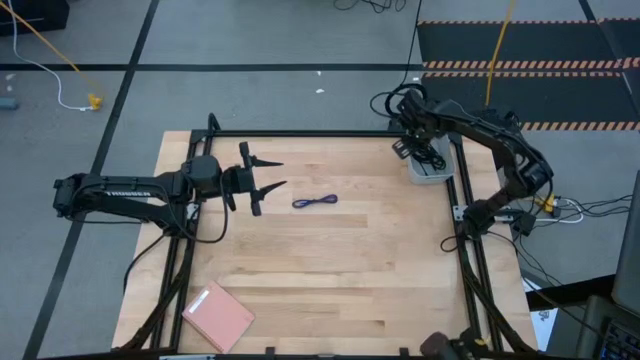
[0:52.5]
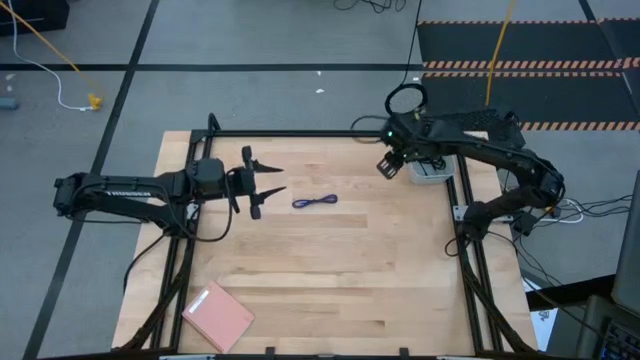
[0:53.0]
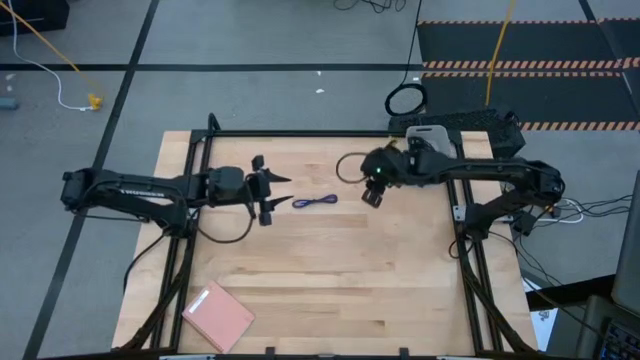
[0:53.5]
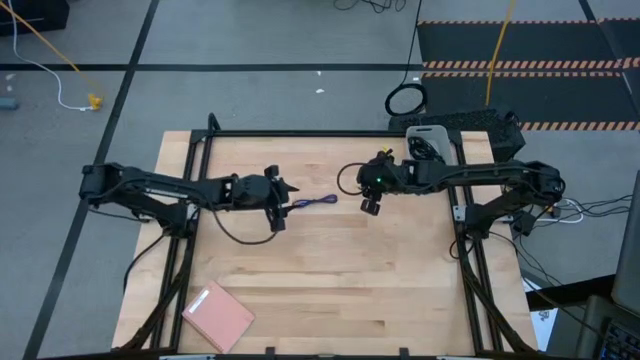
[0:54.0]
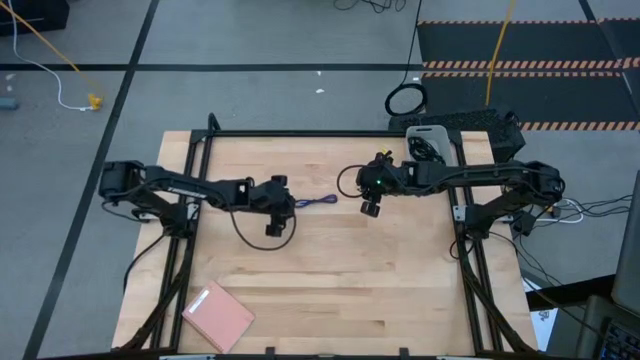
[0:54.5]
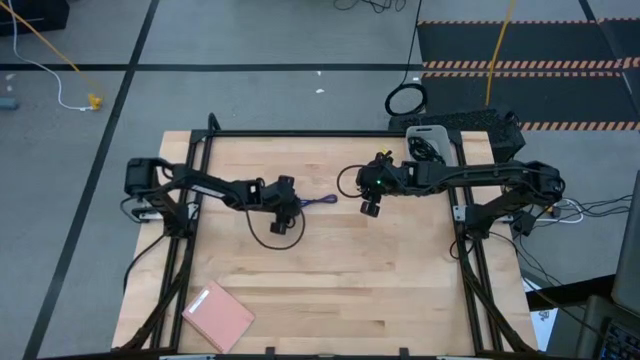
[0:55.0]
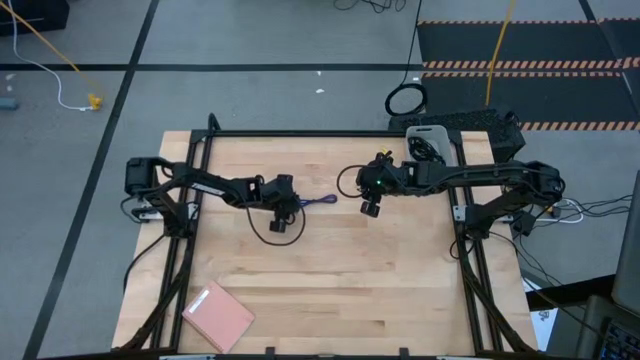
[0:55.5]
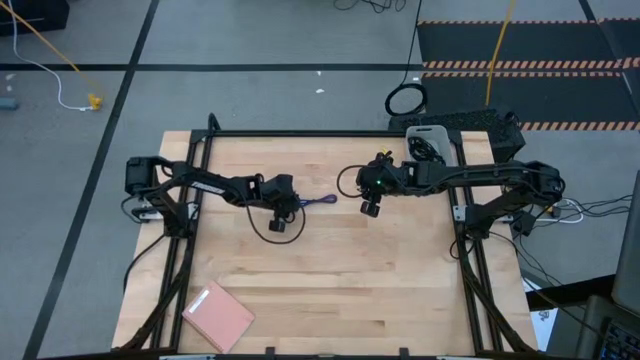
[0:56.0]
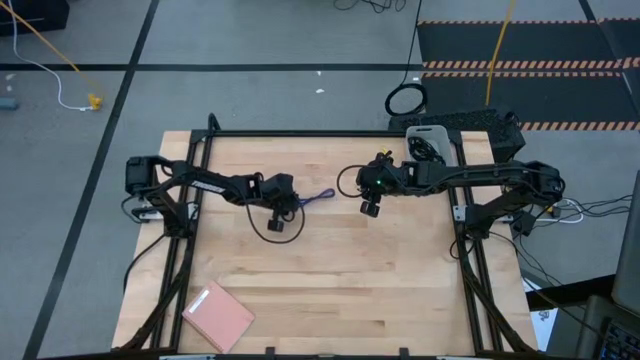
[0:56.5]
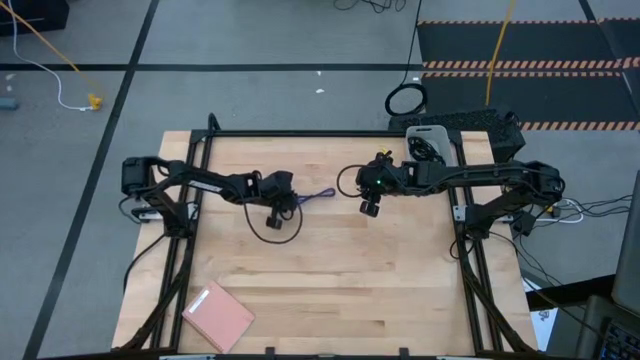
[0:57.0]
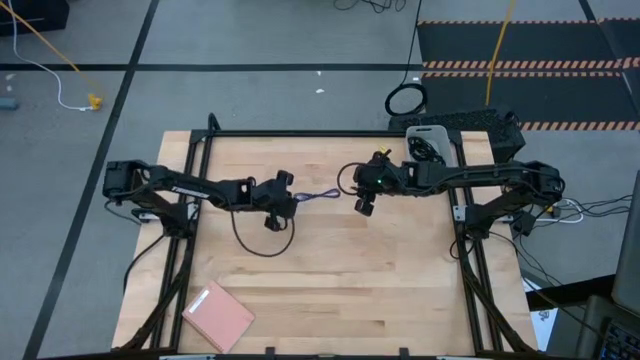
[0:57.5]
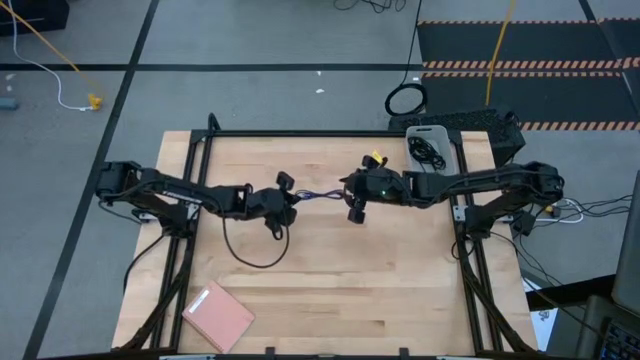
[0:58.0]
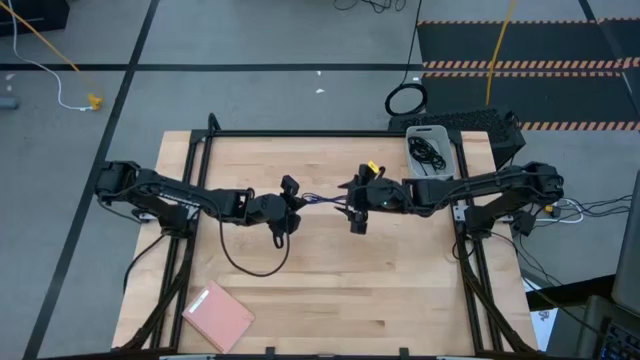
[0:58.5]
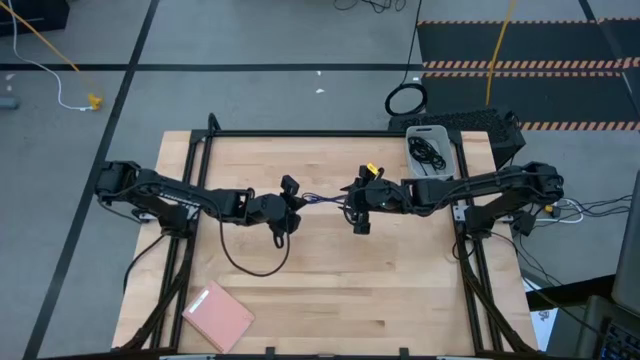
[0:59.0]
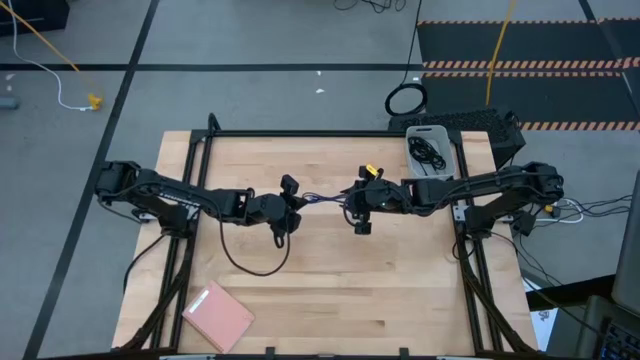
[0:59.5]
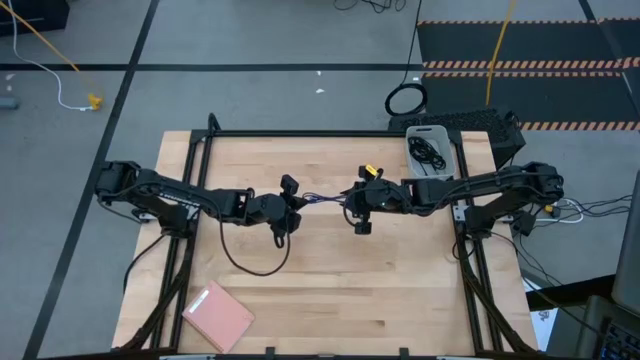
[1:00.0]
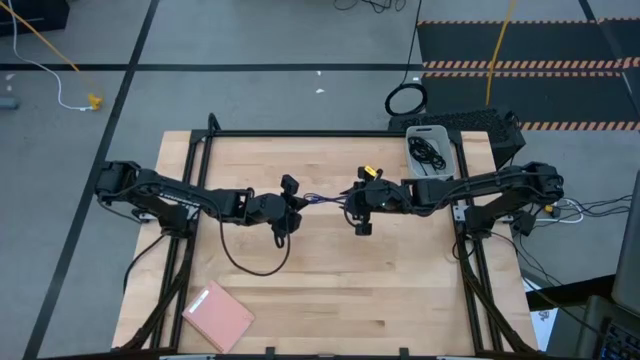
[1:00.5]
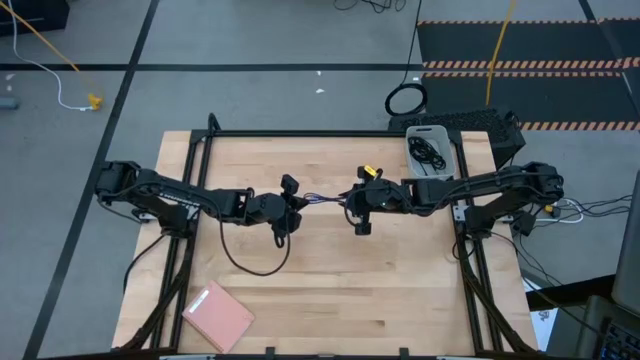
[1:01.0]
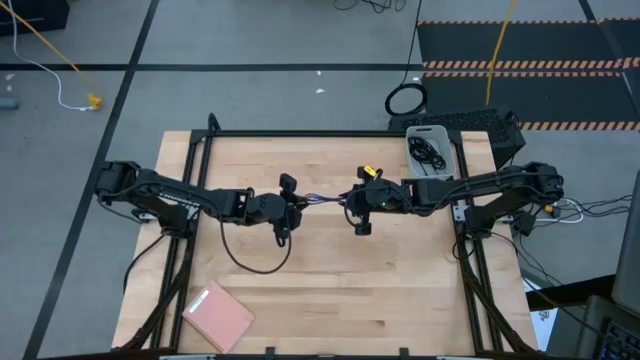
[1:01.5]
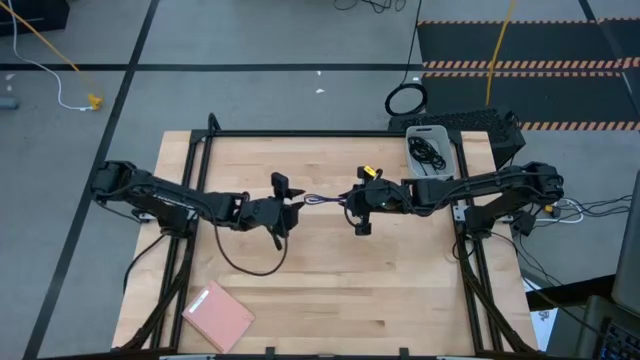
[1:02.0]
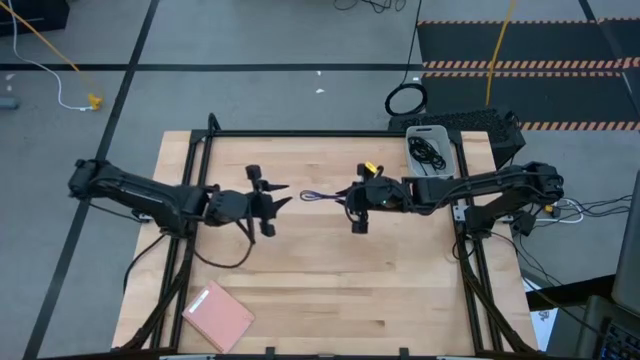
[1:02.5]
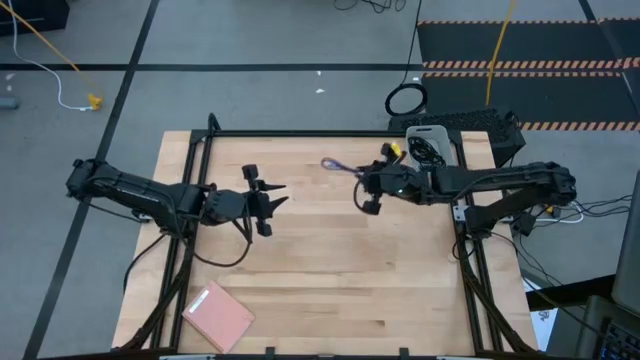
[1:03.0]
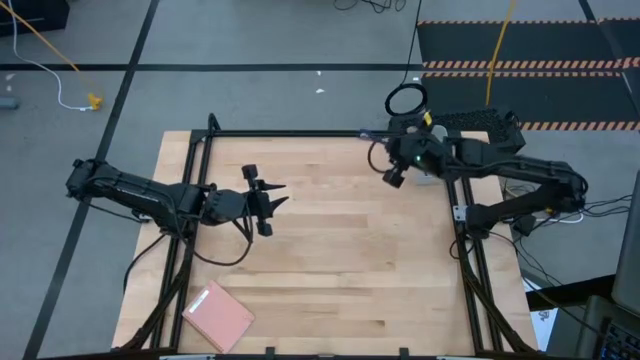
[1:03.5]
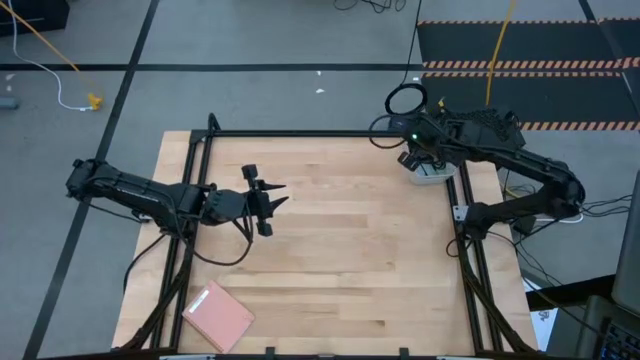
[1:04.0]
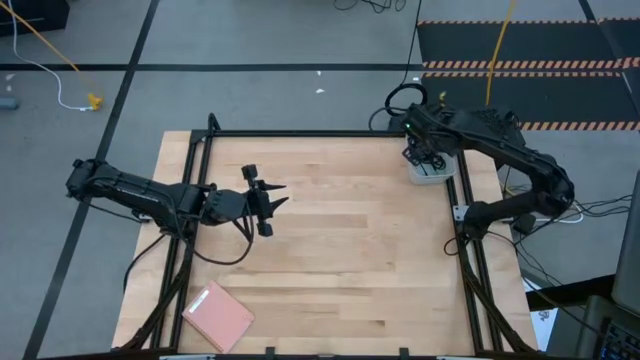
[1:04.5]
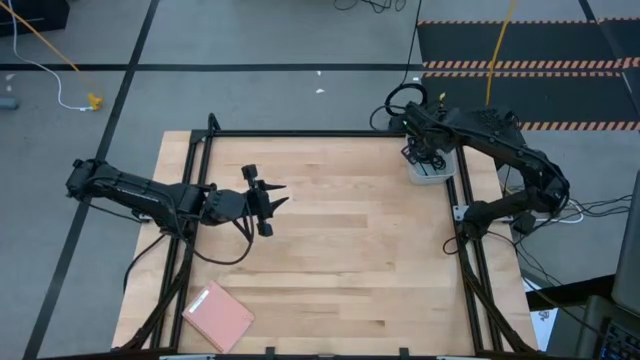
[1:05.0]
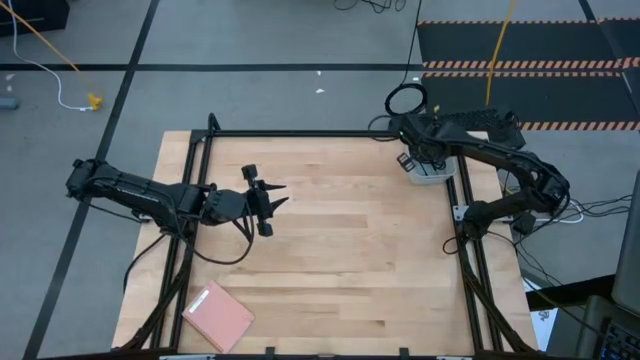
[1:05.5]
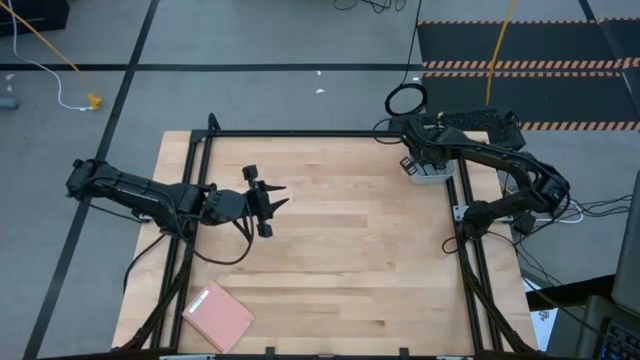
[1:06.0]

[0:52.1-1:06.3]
Task: Pick and place USB-C Cables
Put the blue charger cable into the white bin

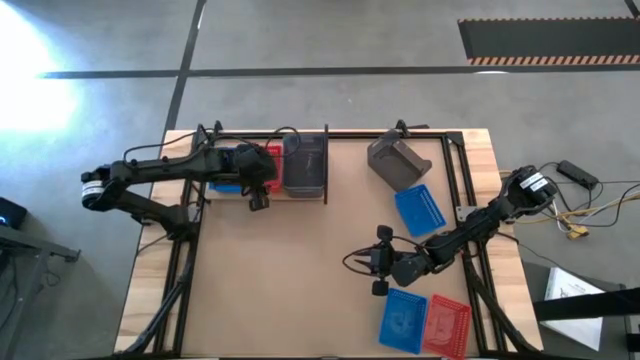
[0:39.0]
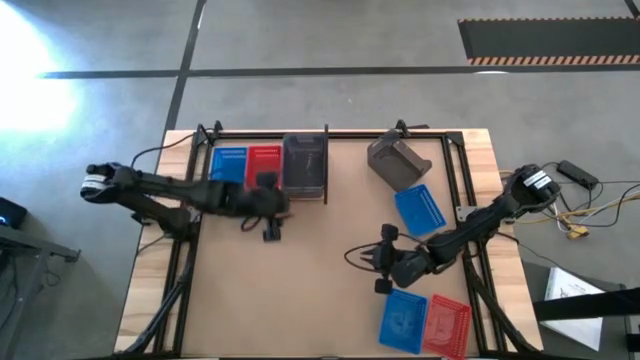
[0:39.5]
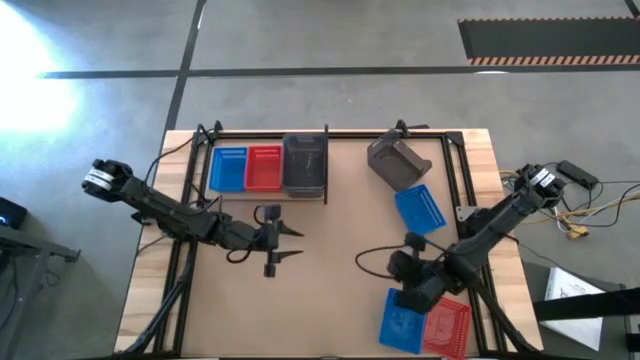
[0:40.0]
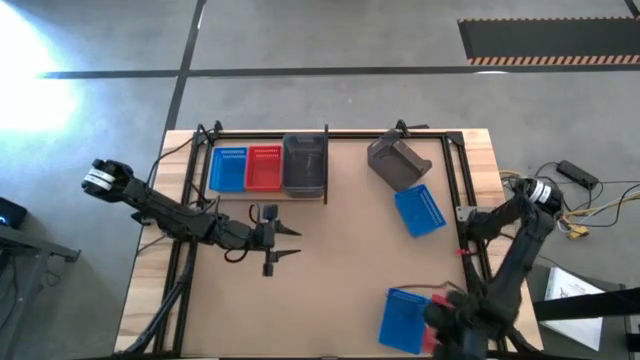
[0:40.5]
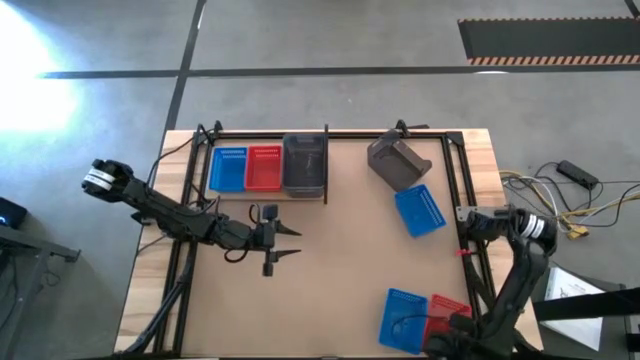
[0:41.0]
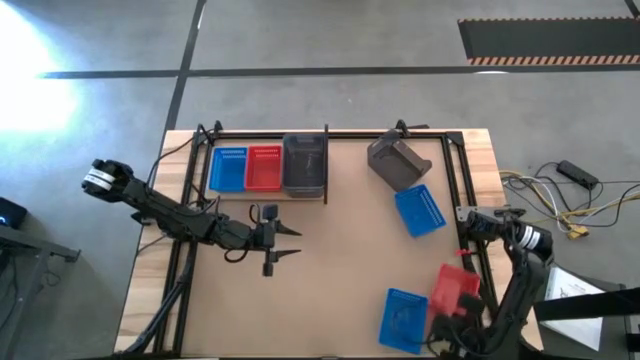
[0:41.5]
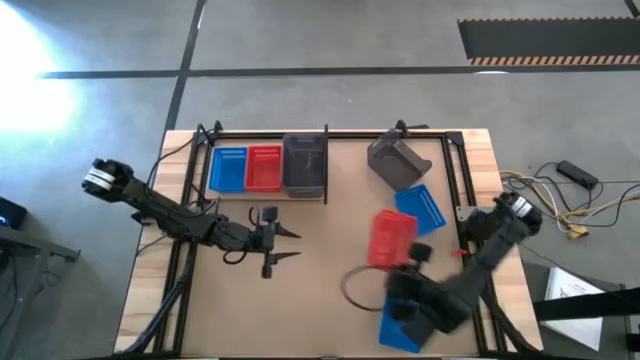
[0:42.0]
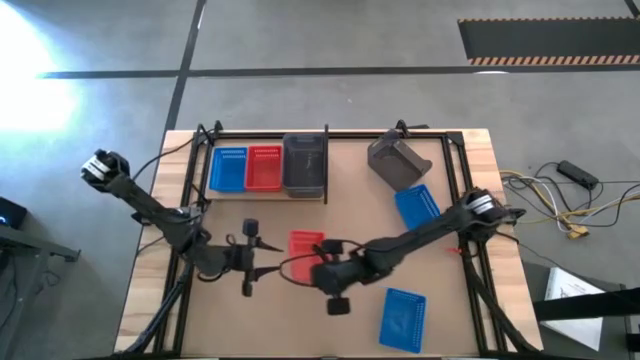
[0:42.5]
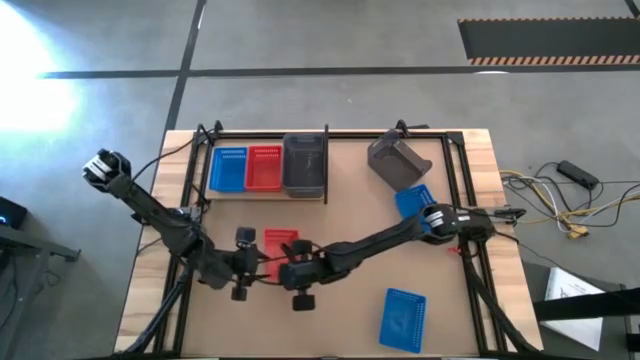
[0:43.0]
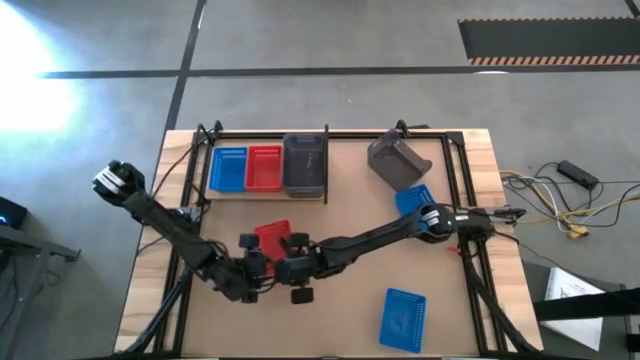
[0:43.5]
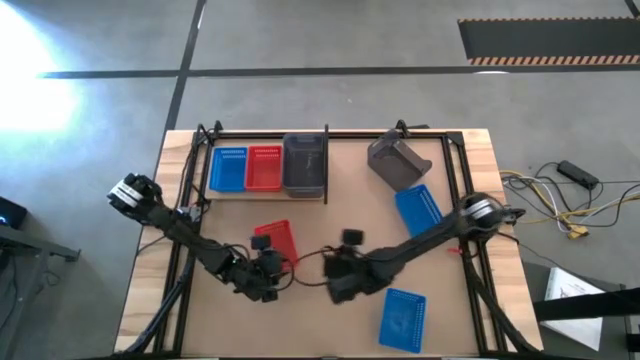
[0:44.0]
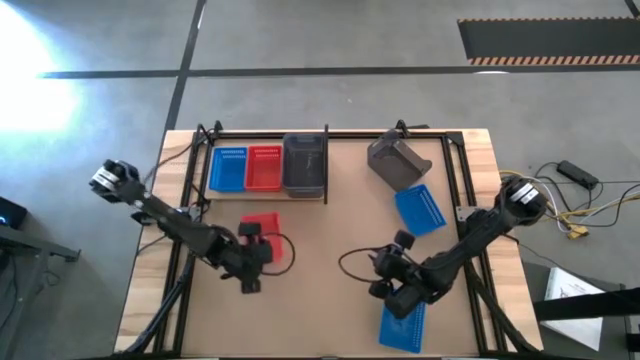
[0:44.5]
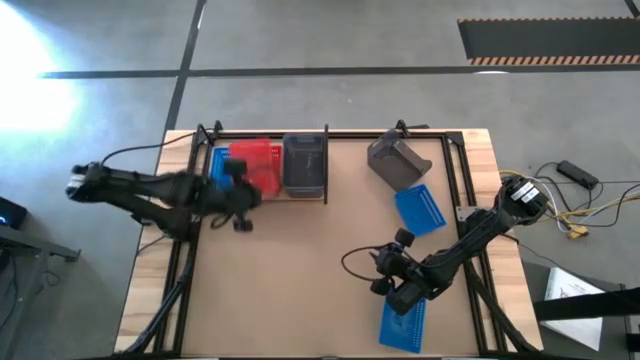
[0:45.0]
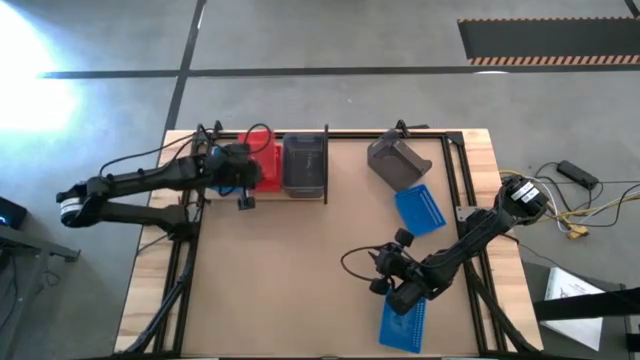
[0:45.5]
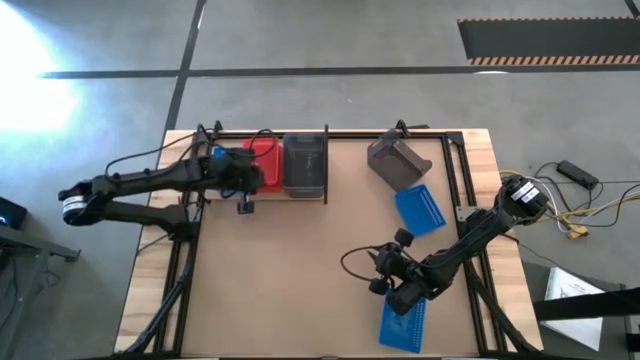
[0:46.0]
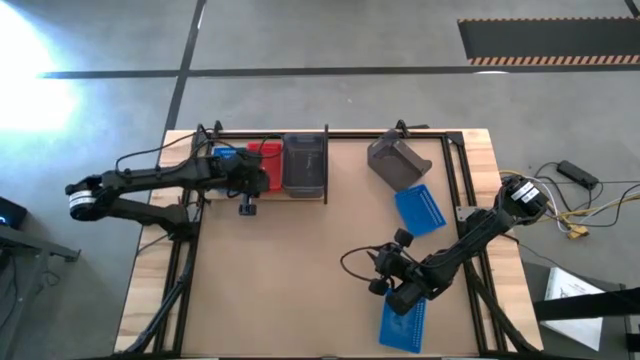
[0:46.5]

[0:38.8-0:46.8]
Task: Stack baskets on shelf by color
Stack the red bin on the stacked red bins on the shelf
